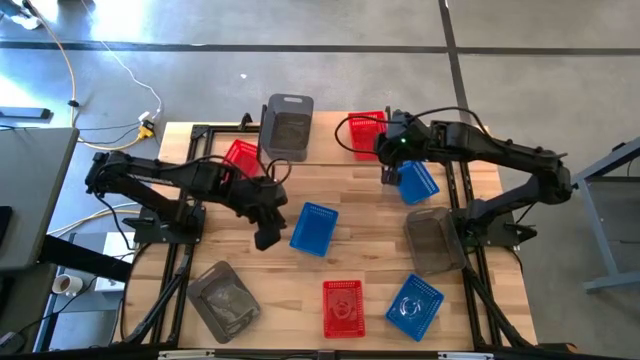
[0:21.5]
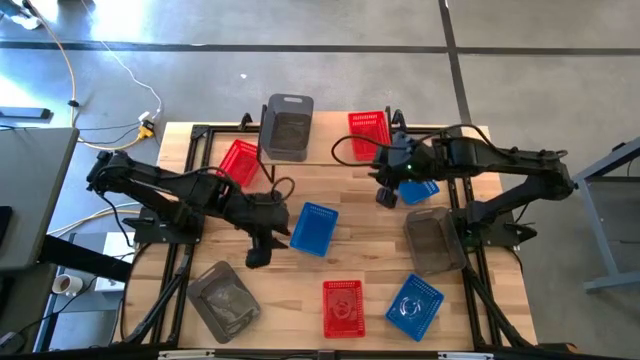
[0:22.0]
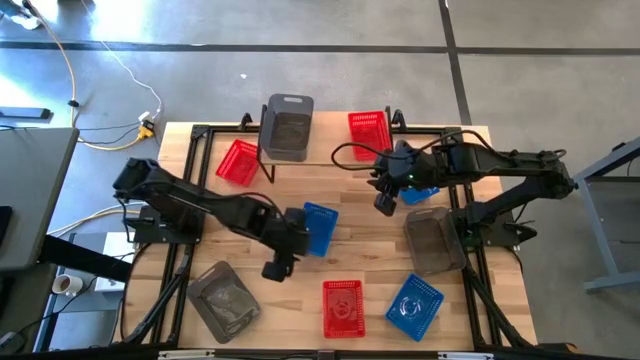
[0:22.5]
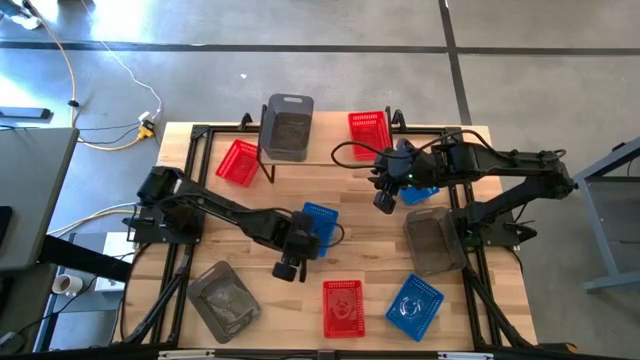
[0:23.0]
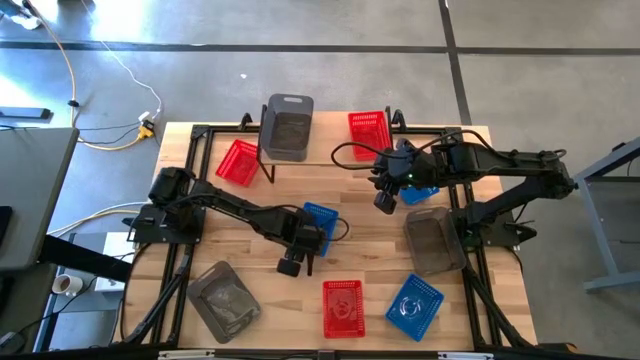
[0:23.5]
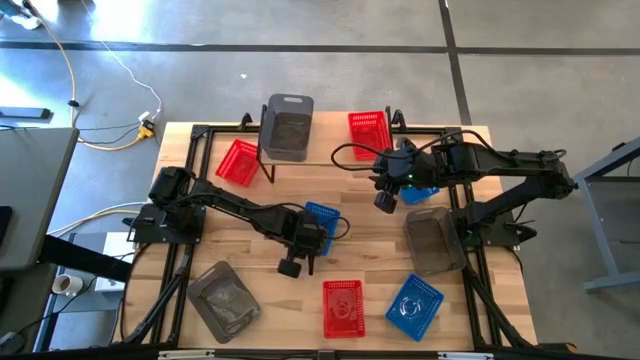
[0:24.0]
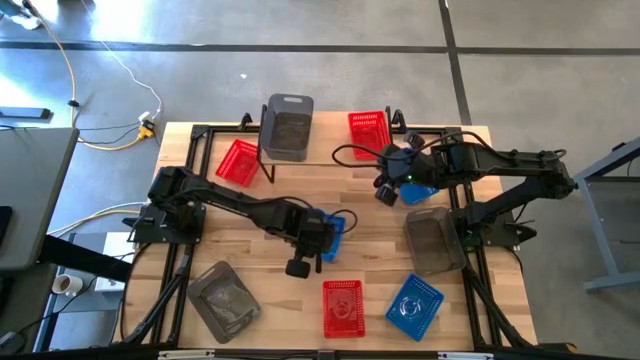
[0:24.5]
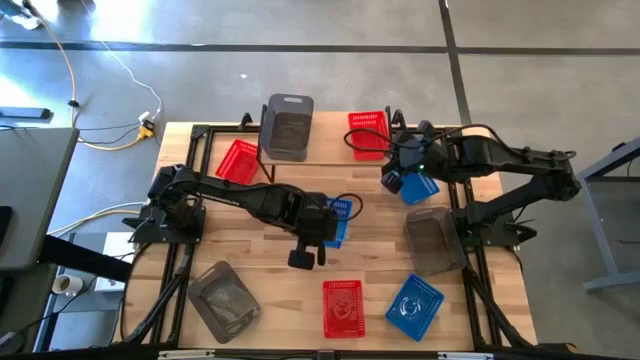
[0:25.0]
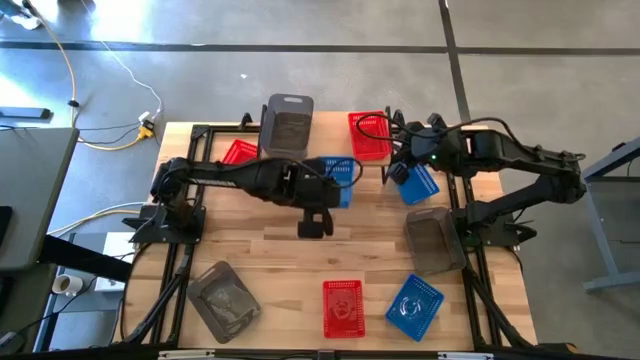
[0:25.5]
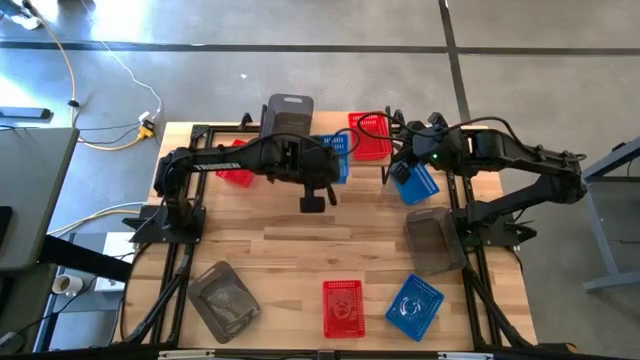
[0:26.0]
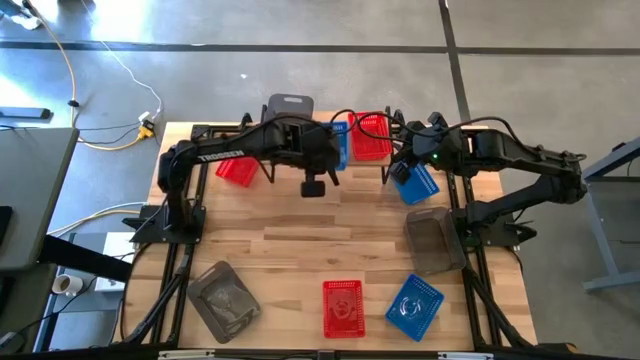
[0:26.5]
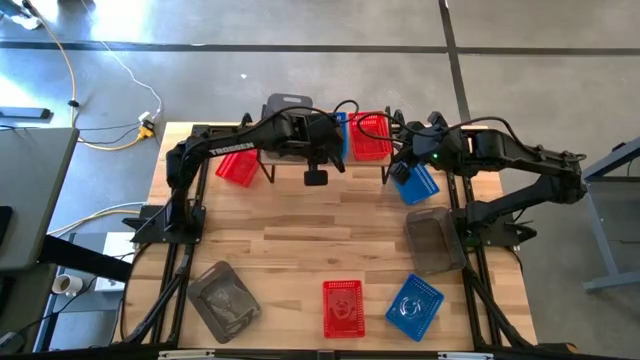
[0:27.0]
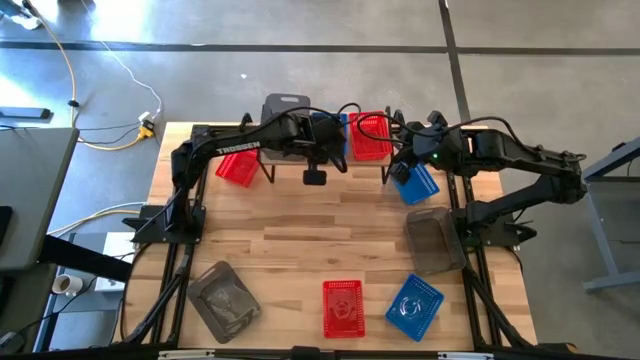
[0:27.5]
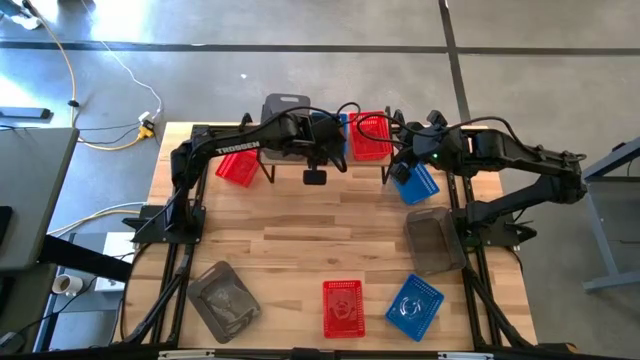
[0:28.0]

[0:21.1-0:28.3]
Task: Stack baskets on shelf by color
Put the middle blue bin on the shelf

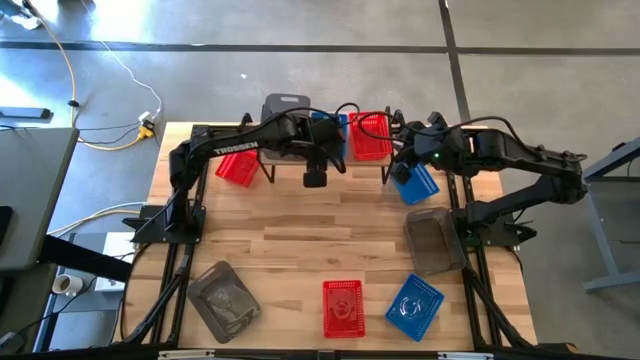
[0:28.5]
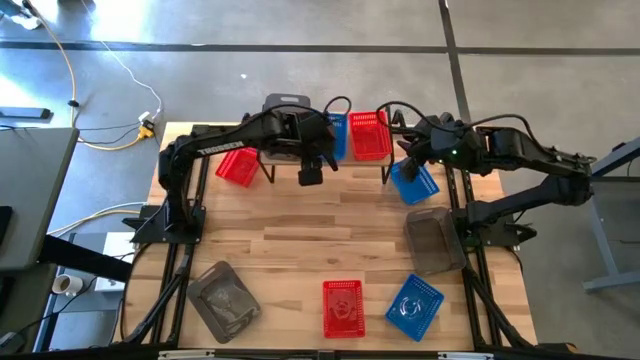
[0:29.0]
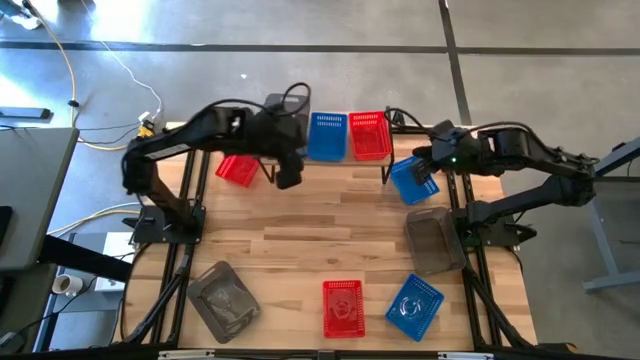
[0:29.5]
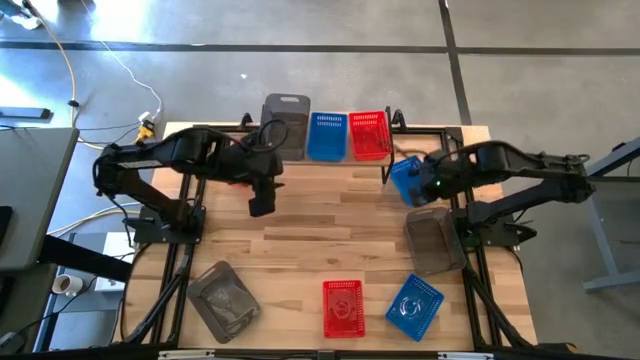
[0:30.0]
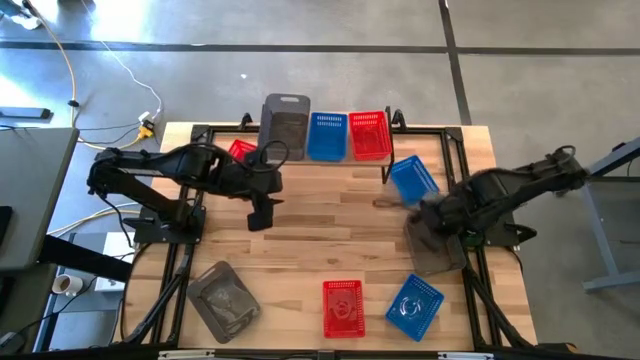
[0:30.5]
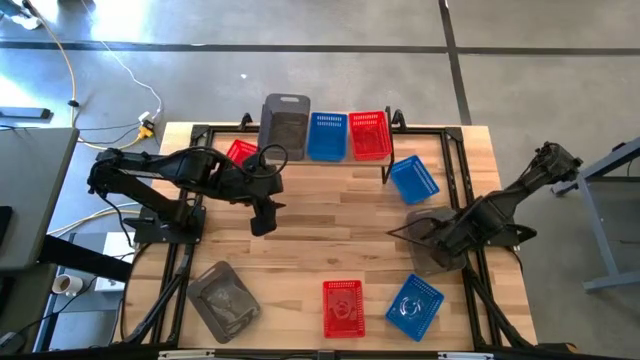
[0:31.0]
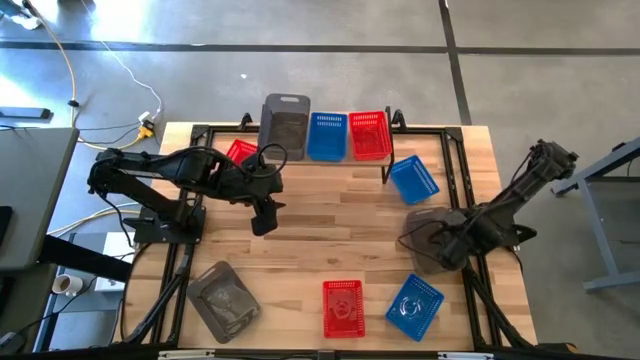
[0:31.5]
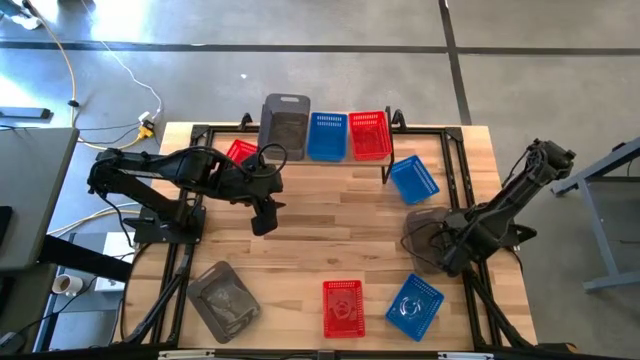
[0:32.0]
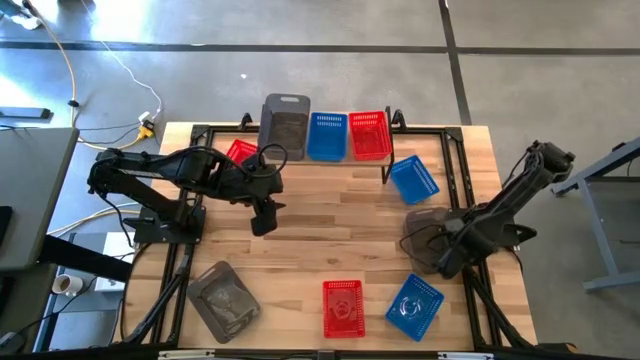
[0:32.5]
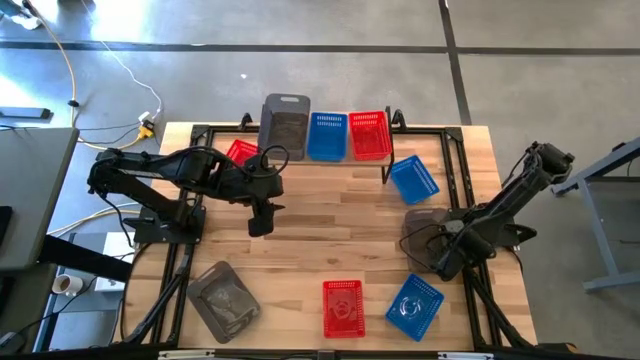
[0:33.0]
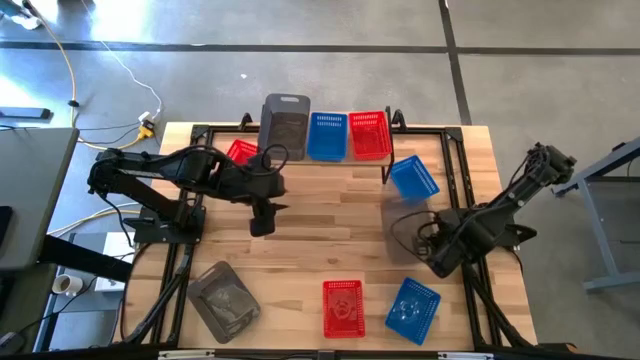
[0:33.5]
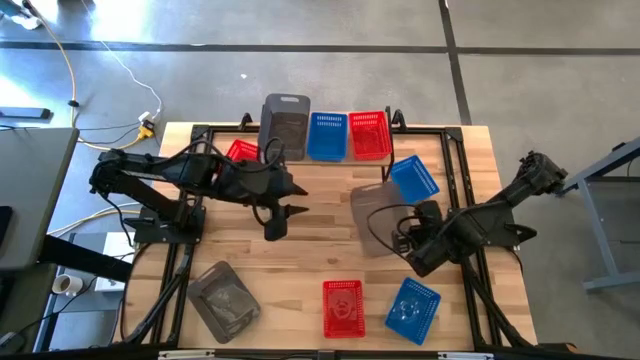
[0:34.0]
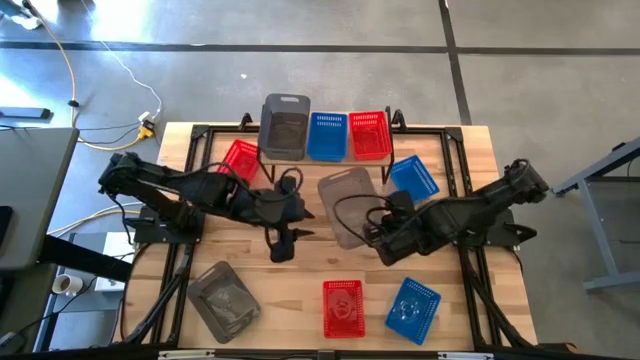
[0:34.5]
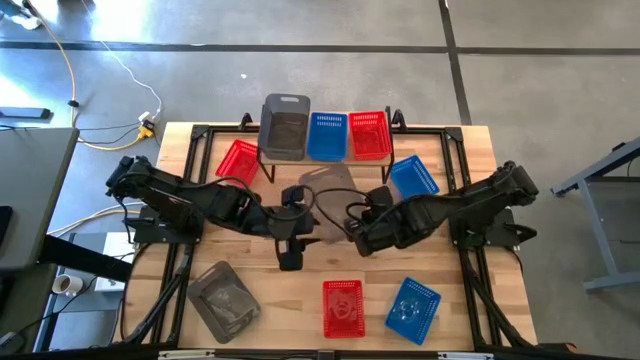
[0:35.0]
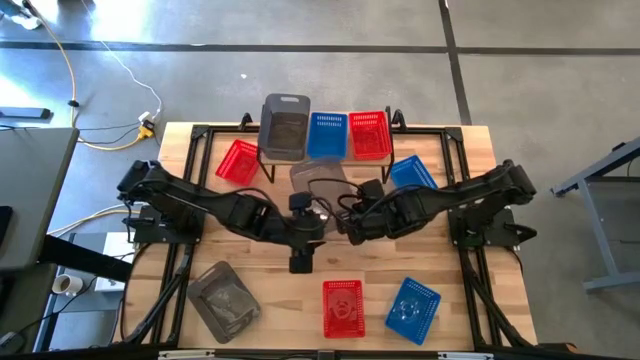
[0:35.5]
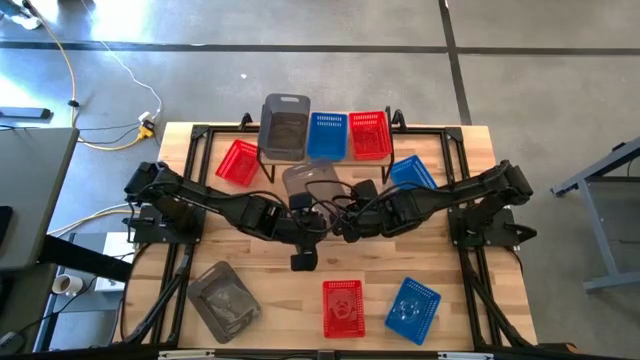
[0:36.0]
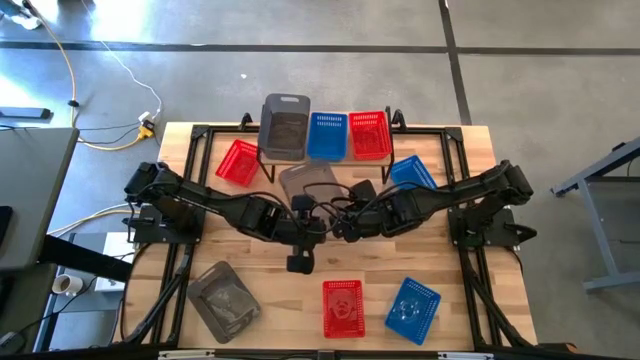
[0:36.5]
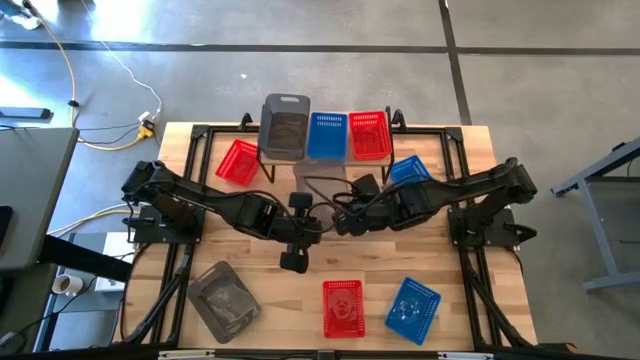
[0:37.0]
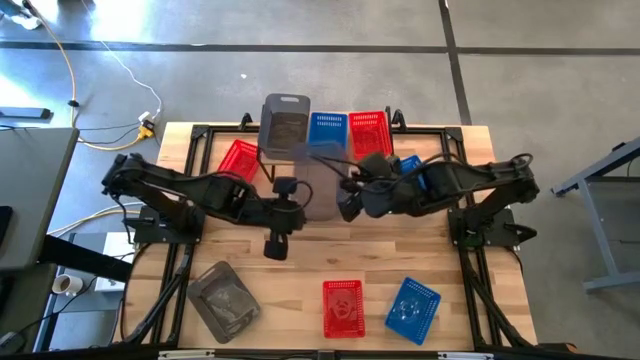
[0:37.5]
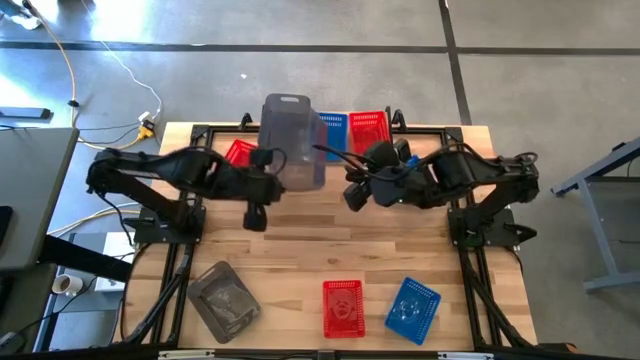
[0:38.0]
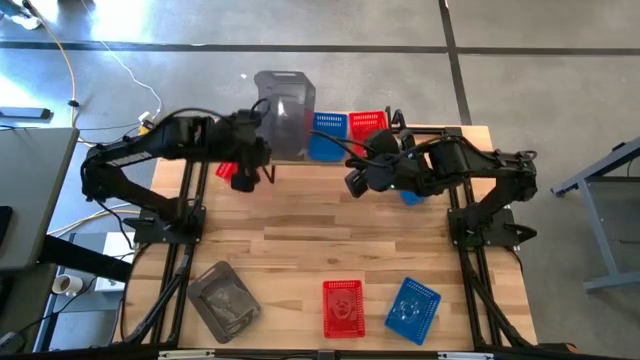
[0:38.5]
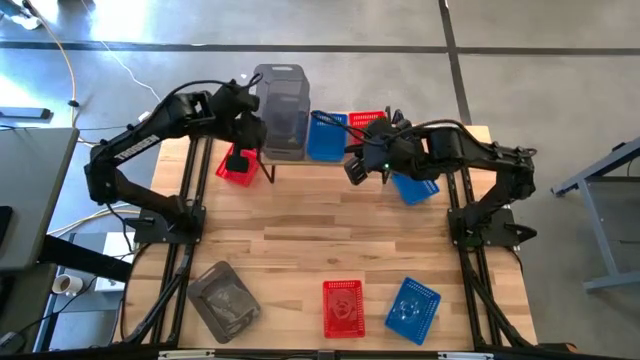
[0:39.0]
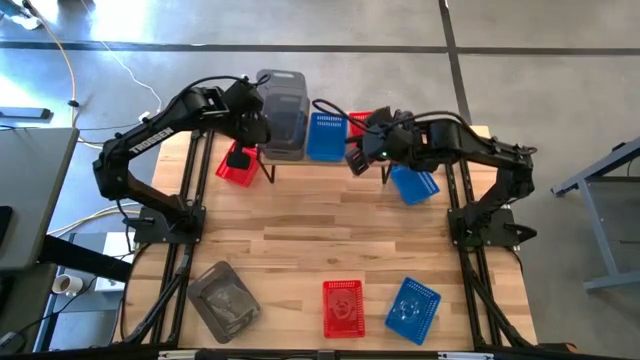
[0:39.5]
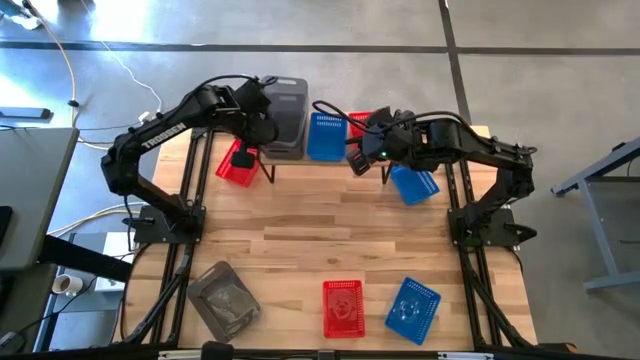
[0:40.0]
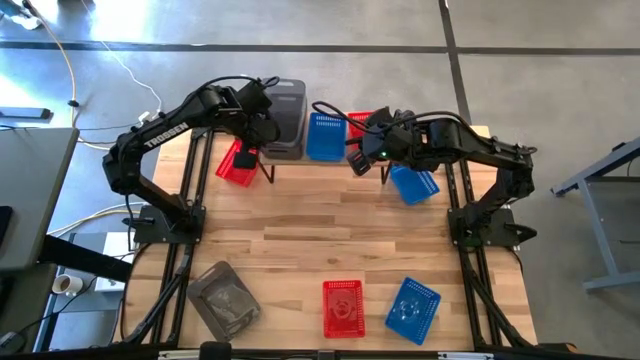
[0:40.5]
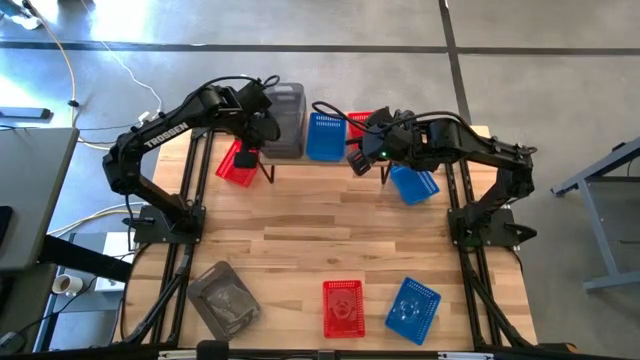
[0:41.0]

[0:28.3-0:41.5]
Stack the right black bin on top of the black bin on the shelf

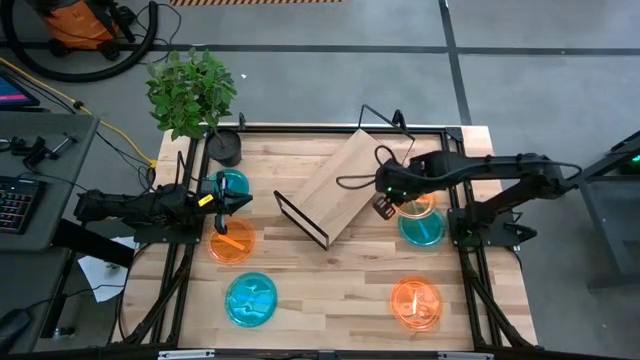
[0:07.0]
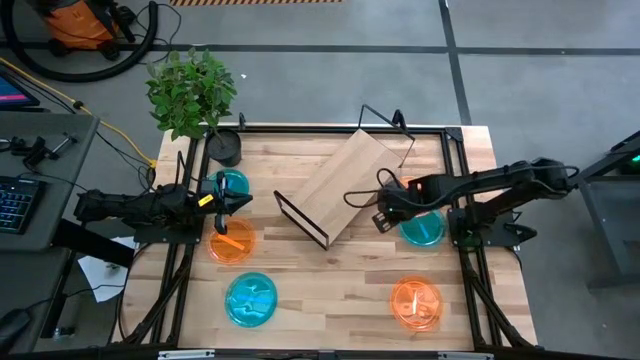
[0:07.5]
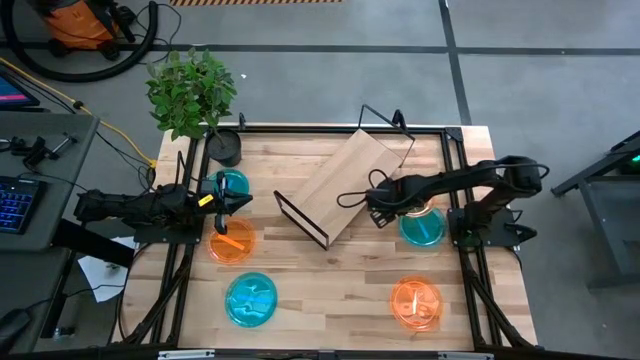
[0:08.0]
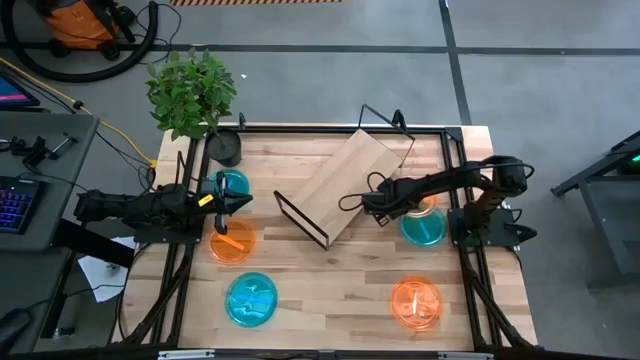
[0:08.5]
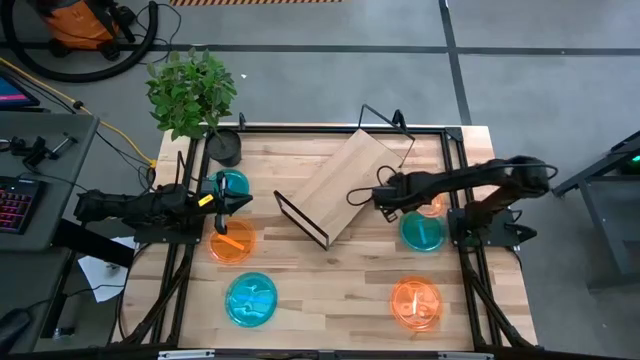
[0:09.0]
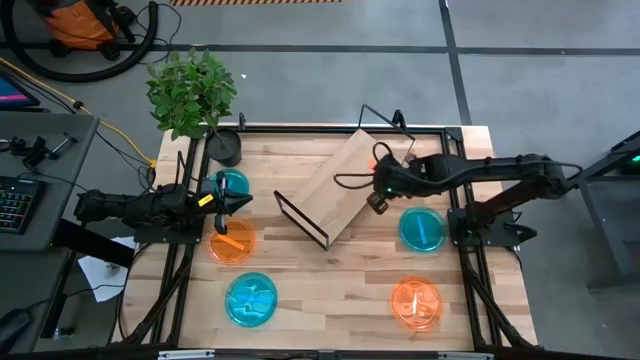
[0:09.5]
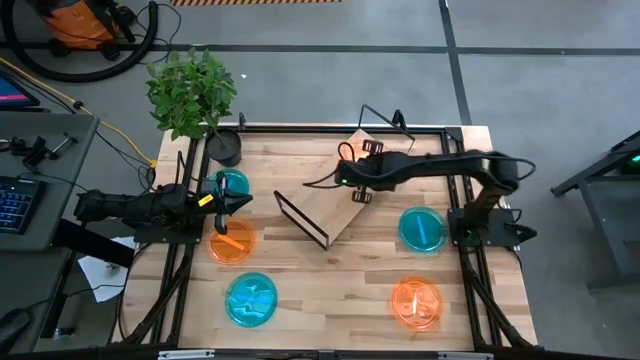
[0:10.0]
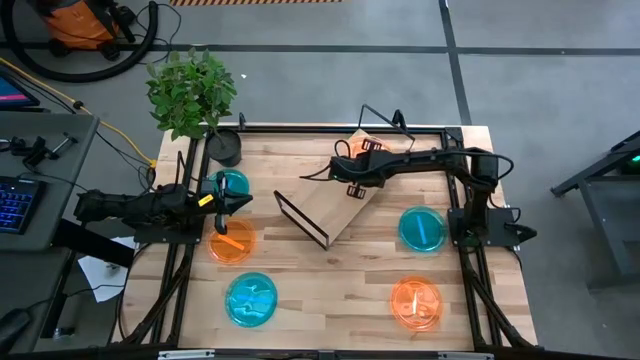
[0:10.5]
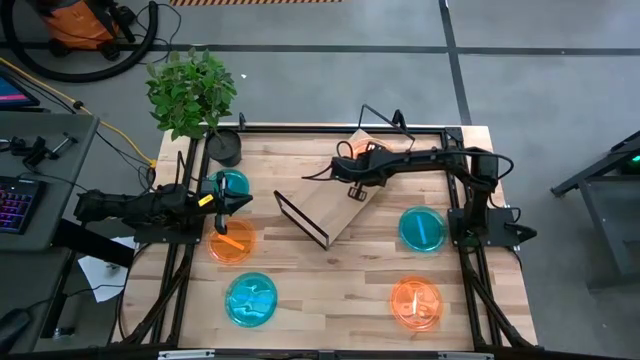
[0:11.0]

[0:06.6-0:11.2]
Task: Place and stack plates onto a shelf
Put the top right orange plate on the shelf
